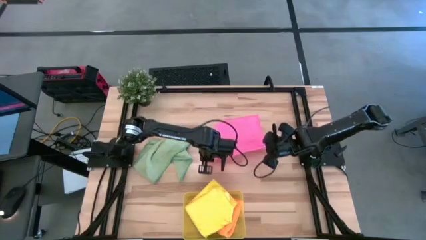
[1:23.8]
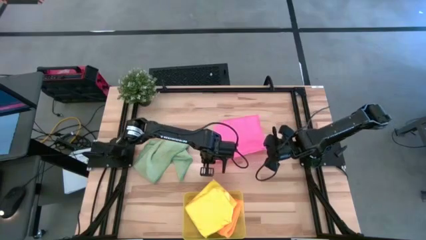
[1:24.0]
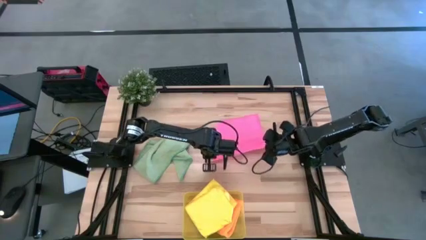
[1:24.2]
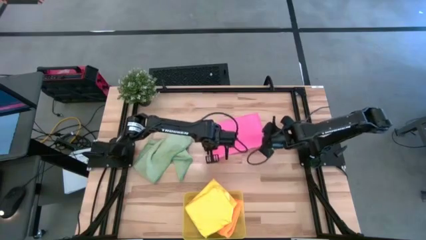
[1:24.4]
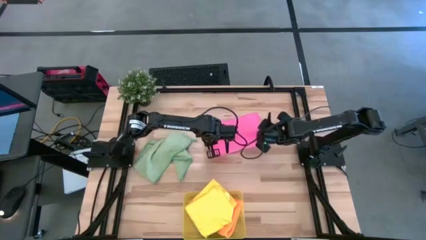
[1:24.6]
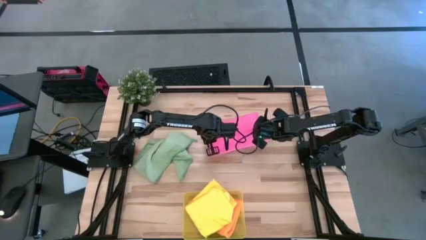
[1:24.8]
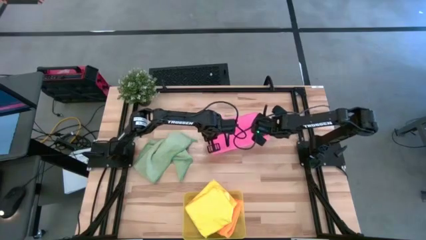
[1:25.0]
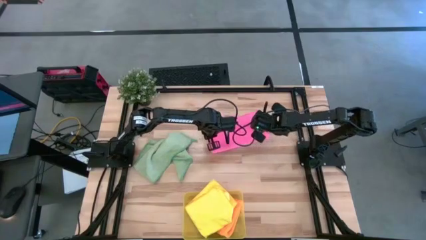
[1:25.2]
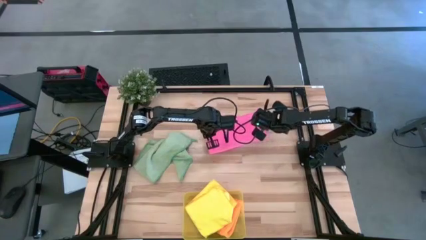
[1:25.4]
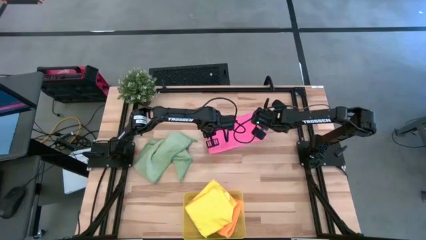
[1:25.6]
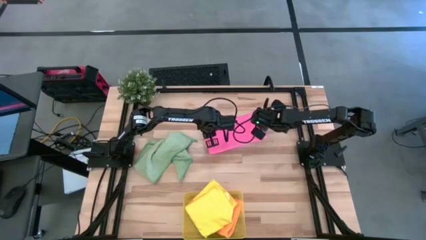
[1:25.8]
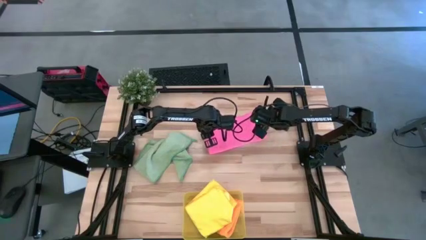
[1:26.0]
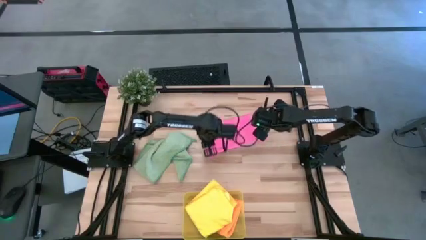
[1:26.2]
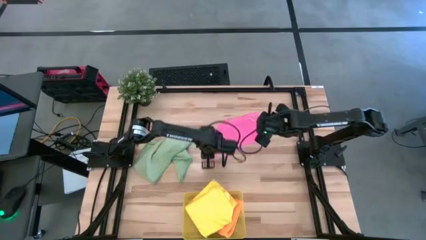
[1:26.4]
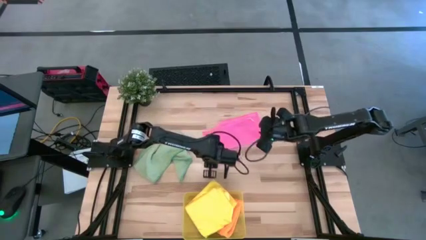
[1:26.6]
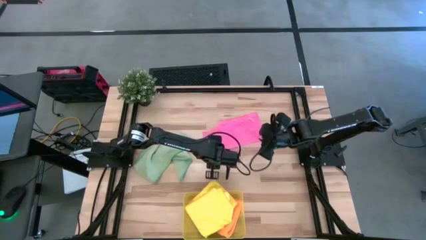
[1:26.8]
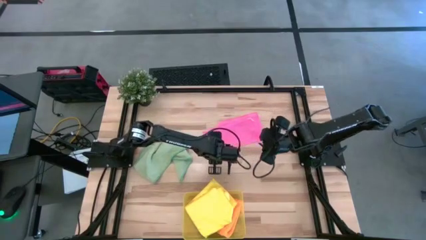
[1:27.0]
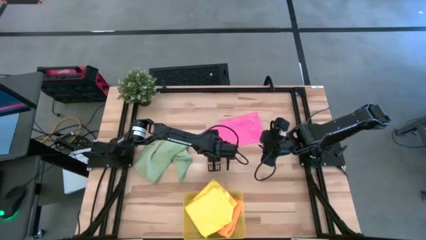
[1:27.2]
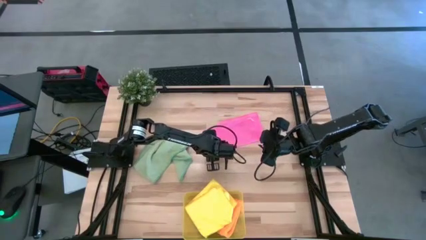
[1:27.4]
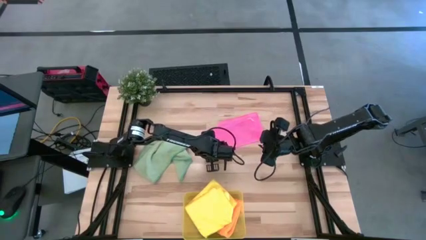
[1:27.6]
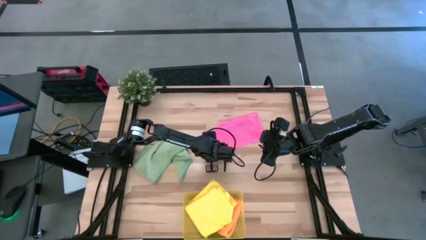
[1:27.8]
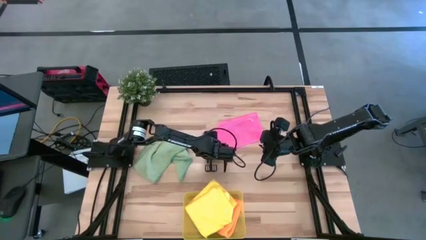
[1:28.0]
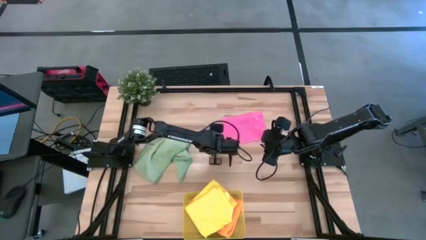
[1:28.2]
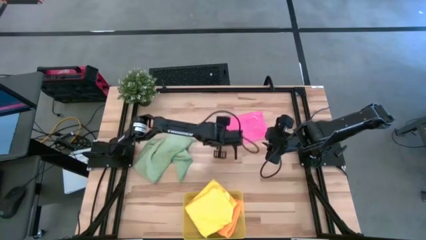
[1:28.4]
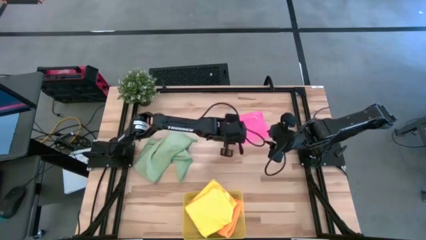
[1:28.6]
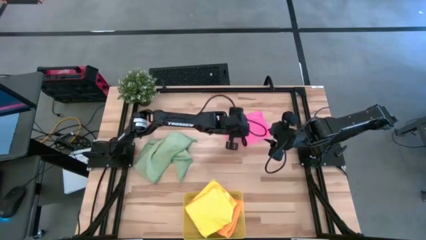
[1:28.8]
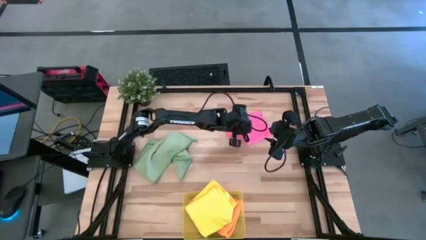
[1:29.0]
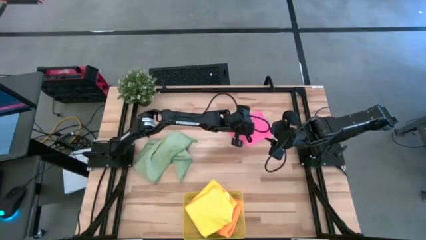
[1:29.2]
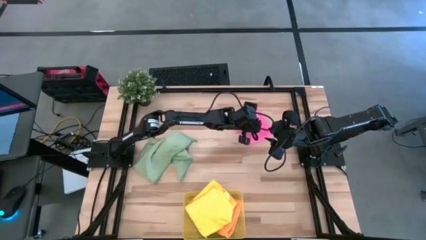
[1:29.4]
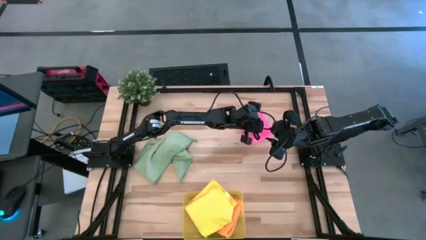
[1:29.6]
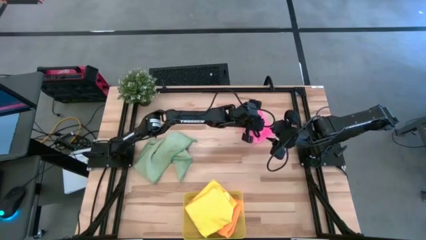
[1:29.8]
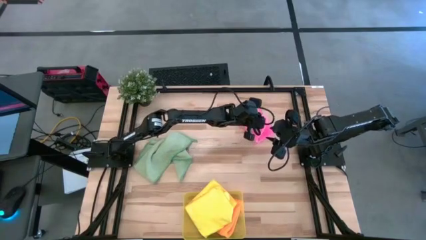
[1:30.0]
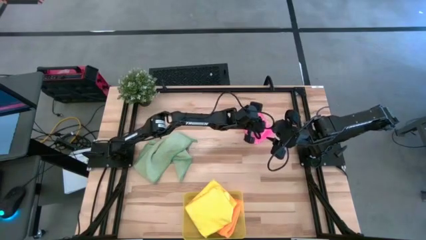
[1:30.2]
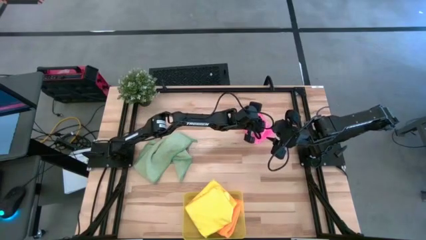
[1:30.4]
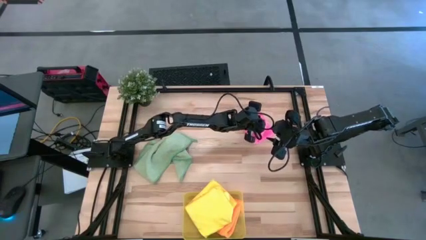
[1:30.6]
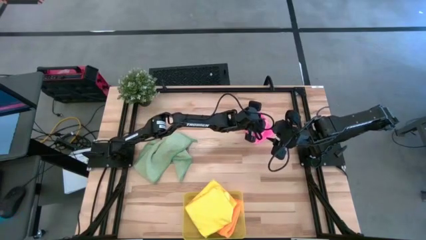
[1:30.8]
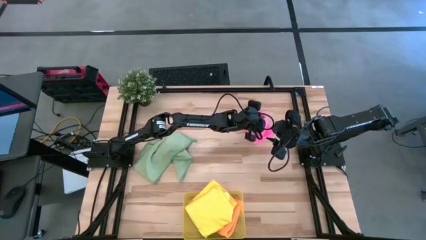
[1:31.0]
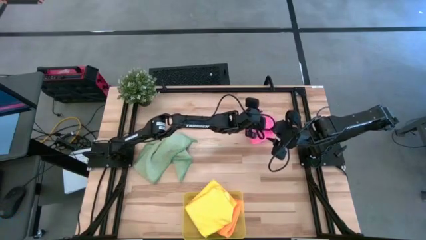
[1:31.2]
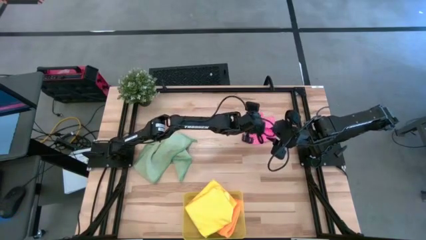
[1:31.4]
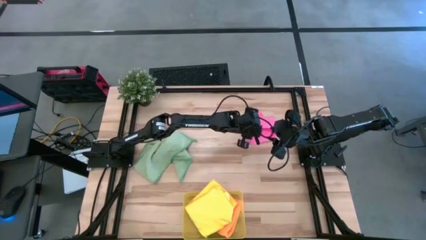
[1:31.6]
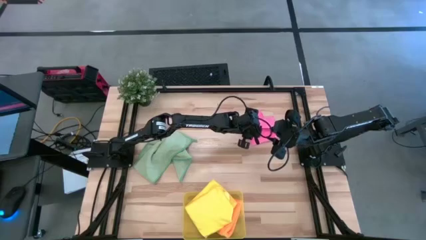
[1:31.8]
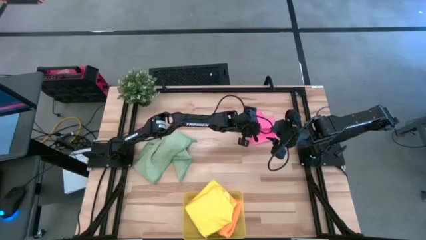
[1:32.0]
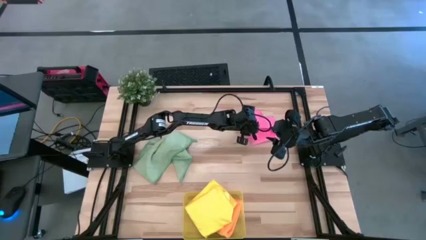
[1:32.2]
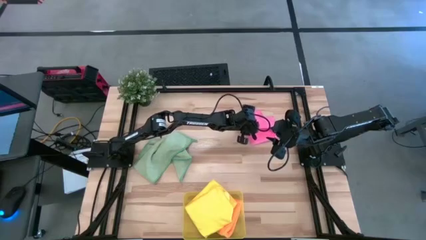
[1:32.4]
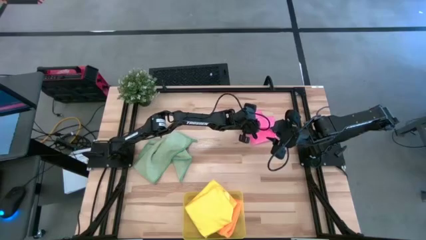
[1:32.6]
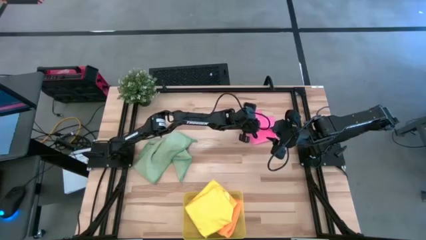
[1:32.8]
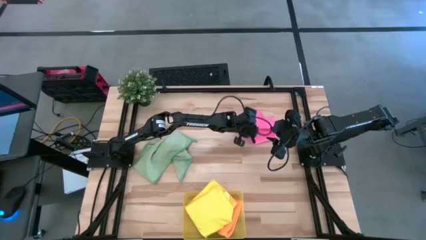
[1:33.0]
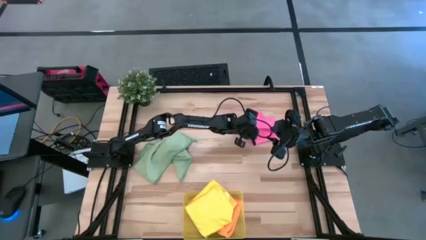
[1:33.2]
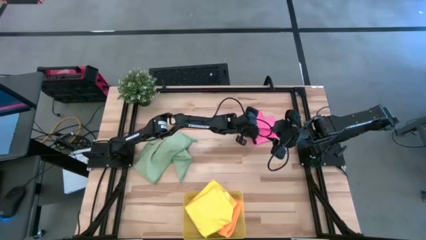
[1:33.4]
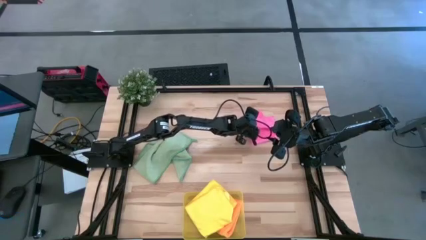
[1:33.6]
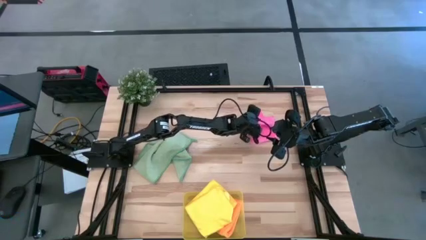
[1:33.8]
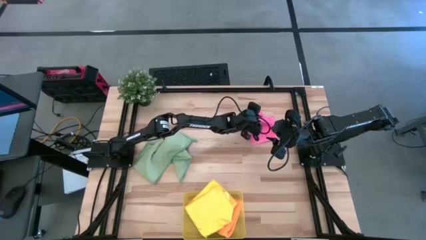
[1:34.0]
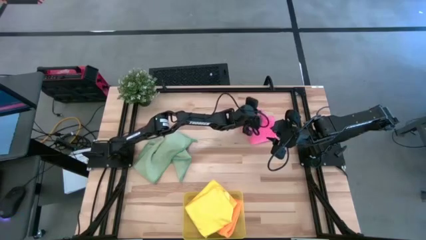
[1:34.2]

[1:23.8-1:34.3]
Task: Fold microfiber towels
Fold the pink microfiber cloth

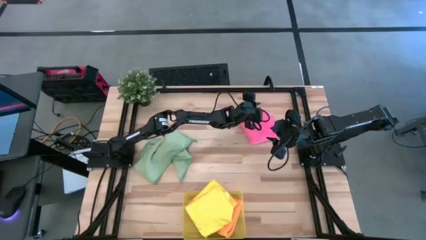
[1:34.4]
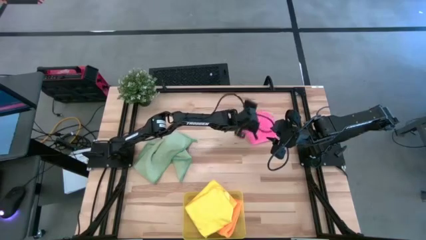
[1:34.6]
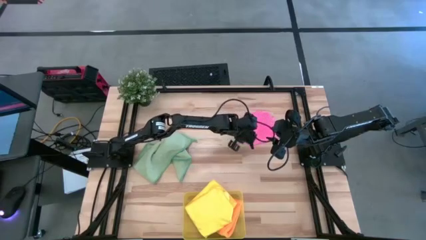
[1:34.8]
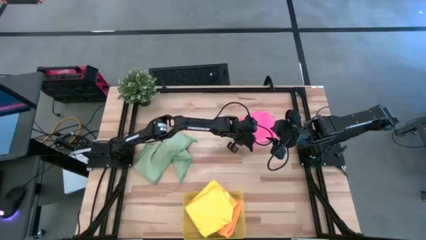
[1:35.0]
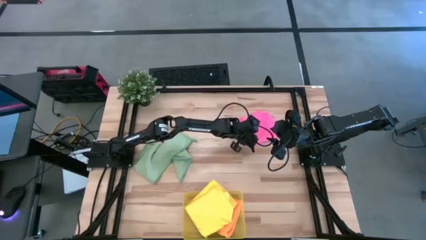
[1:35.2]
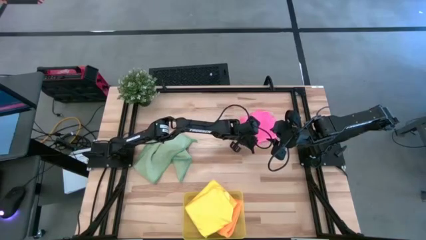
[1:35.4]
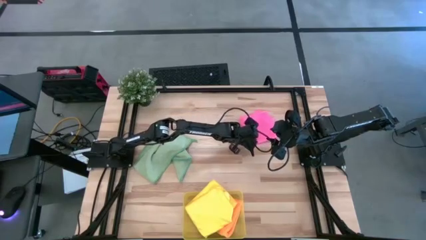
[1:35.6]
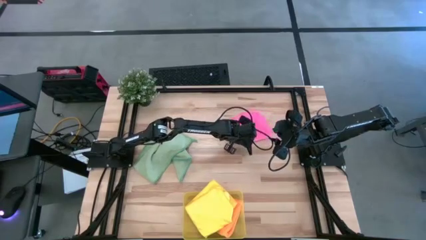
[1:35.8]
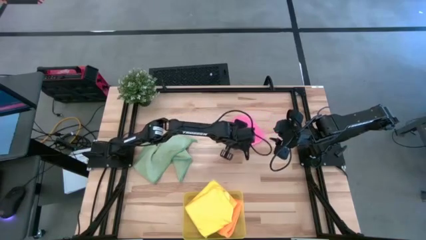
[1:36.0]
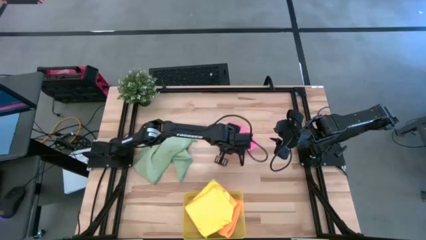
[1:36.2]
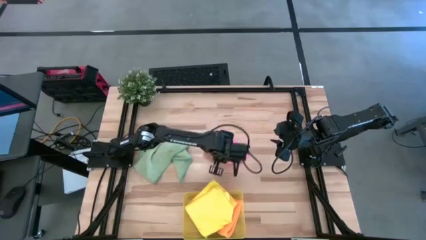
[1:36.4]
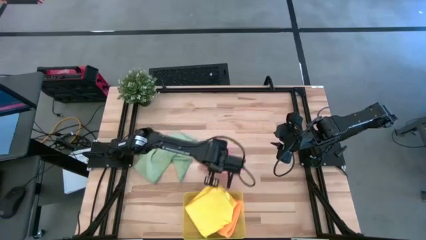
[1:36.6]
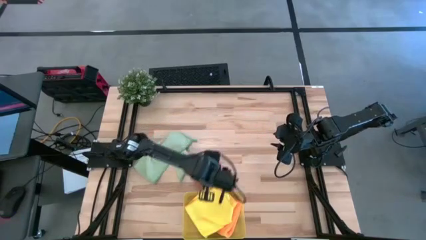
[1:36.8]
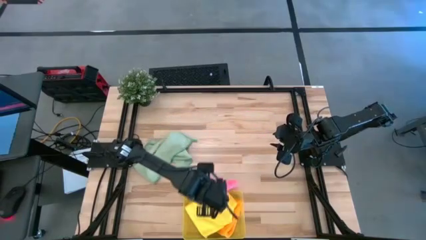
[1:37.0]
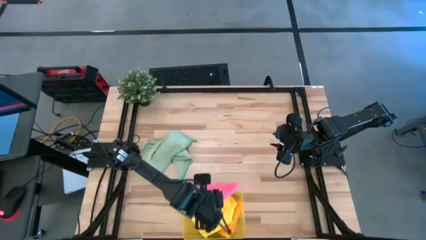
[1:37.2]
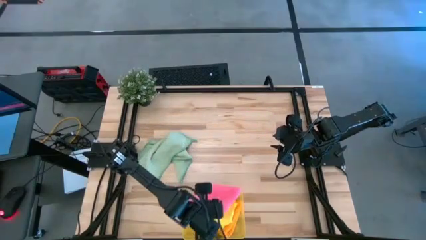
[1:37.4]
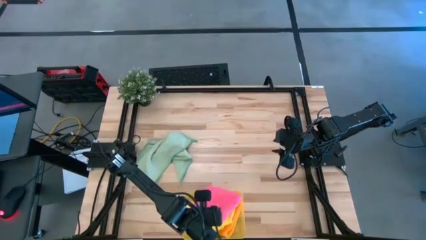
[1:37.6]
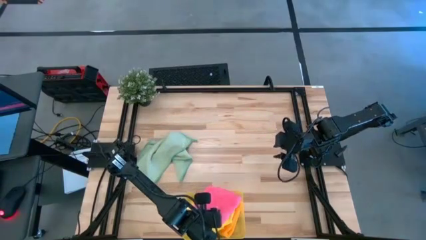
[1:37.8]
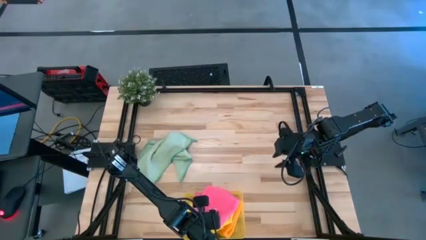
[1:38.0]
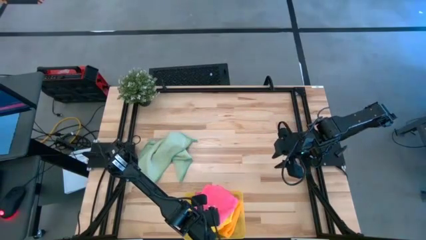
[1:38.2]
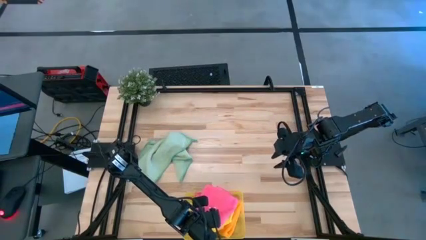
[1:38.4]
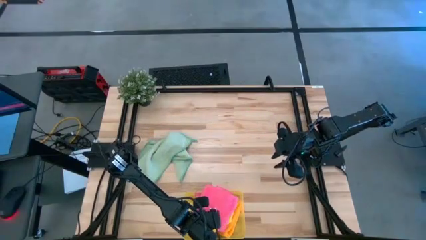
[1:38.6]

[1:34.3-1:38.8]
Put the pink microfiber cloth into the yellow bin
